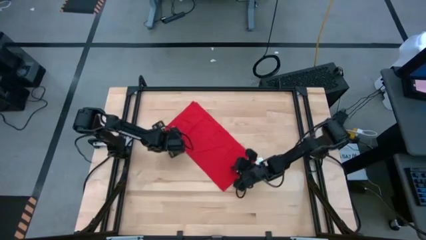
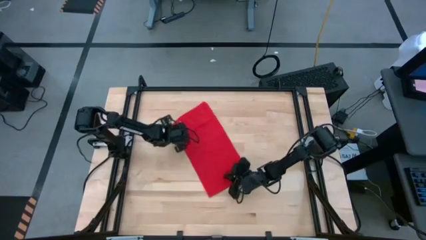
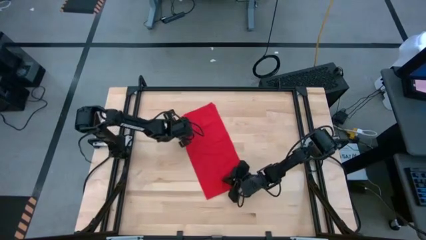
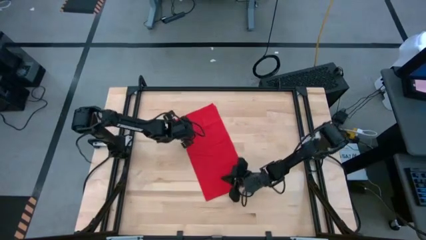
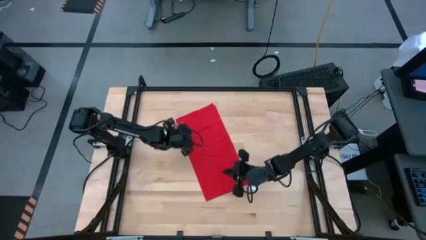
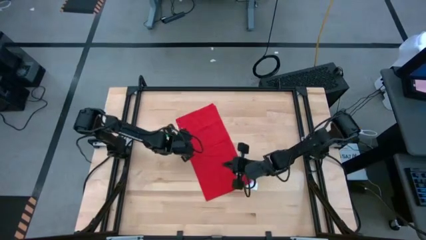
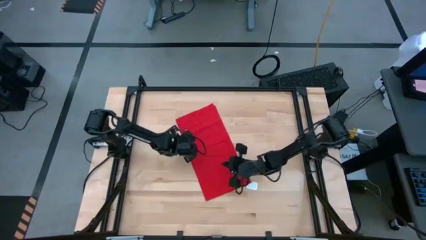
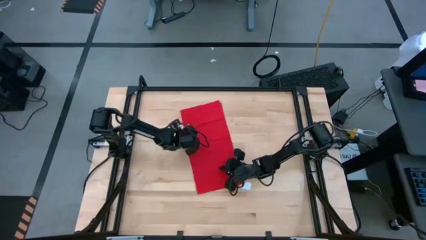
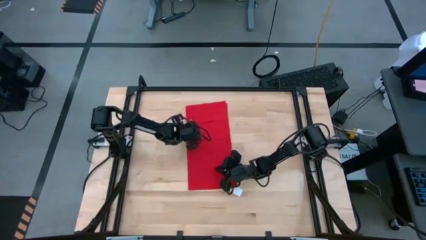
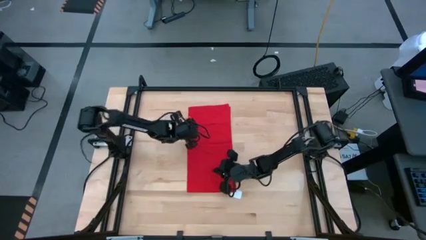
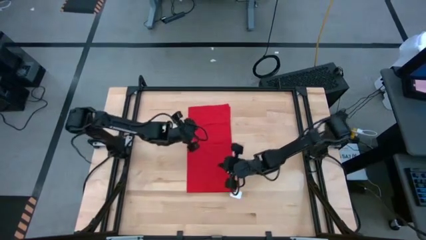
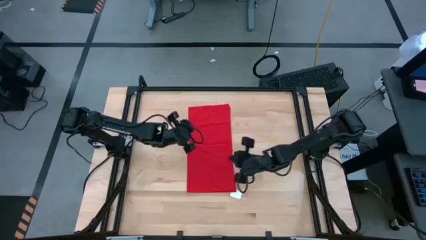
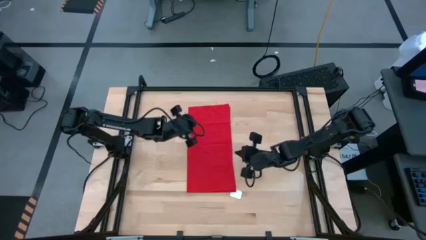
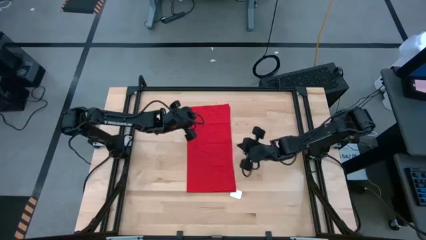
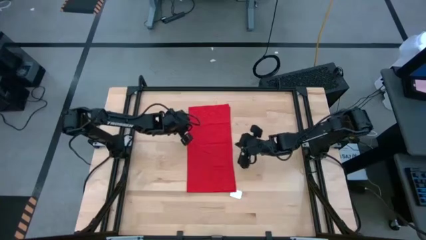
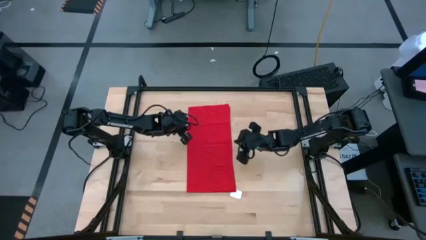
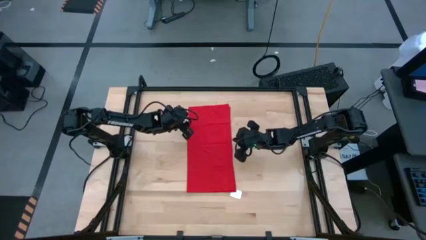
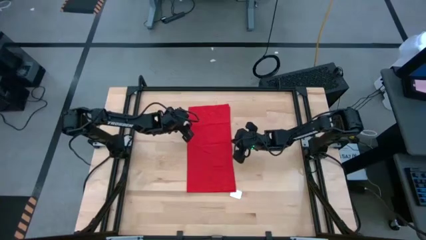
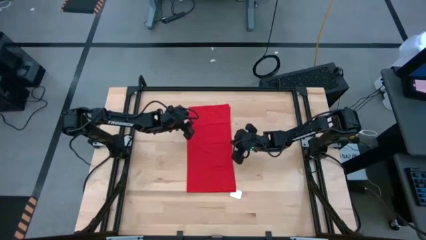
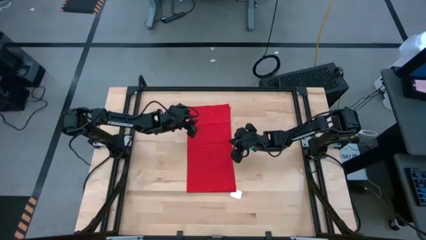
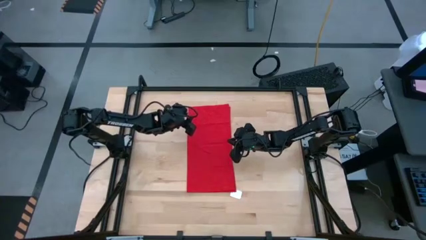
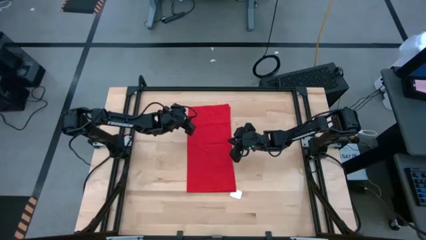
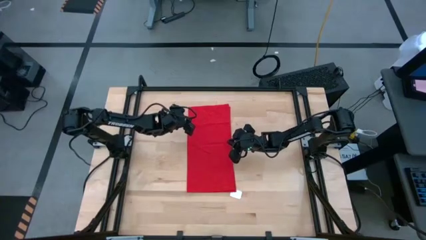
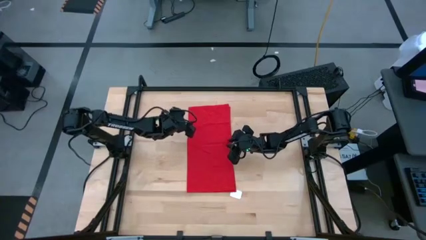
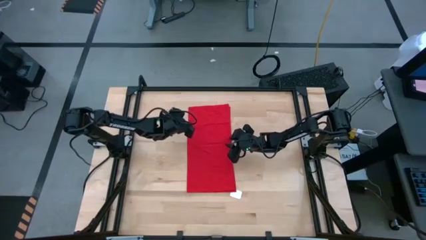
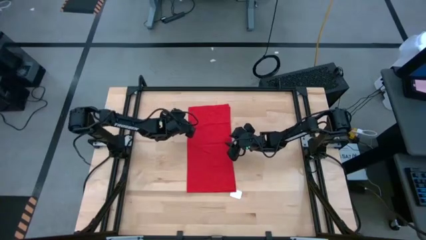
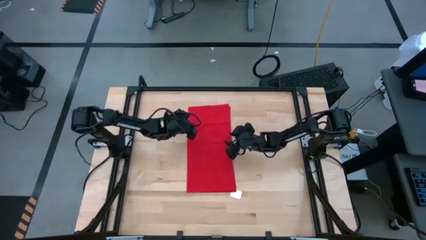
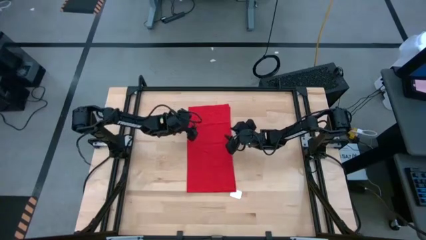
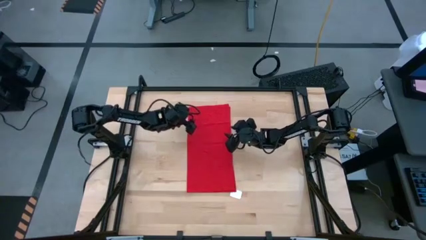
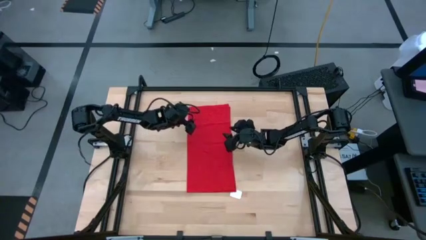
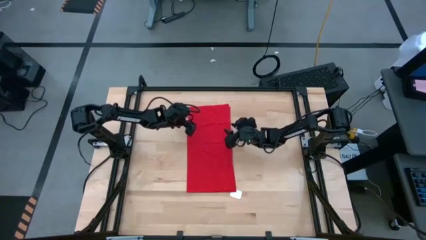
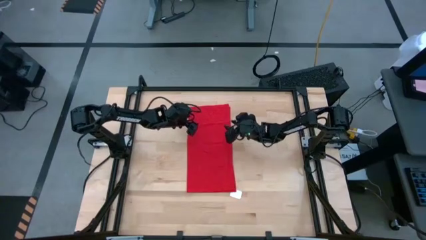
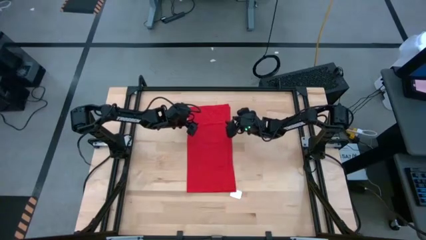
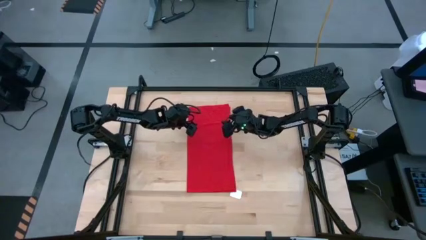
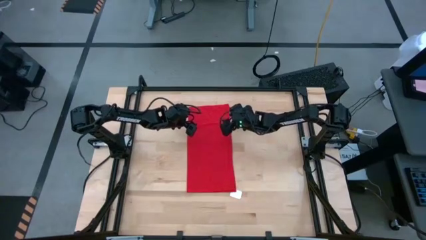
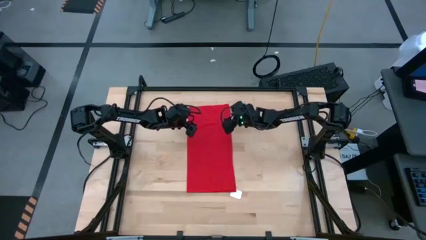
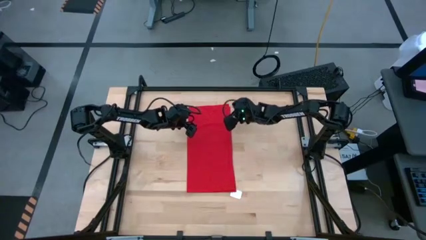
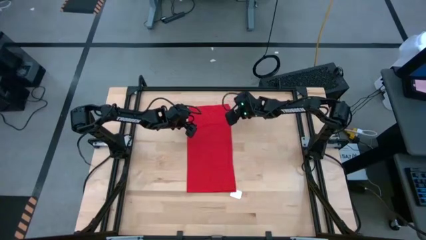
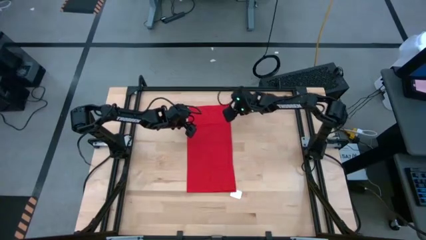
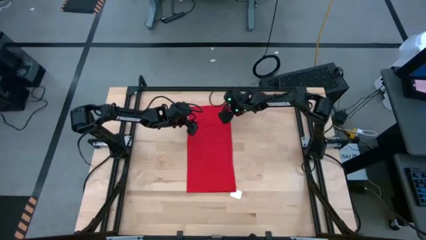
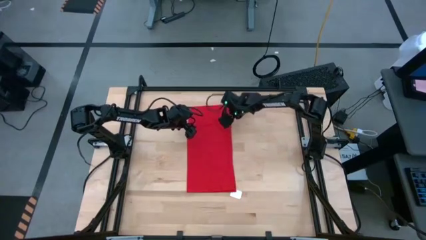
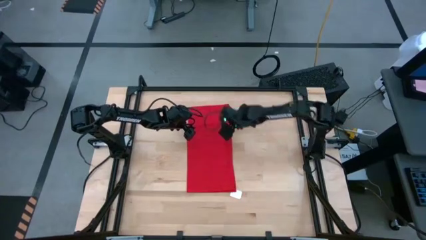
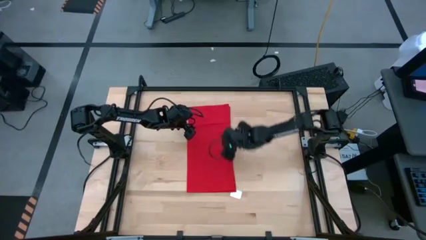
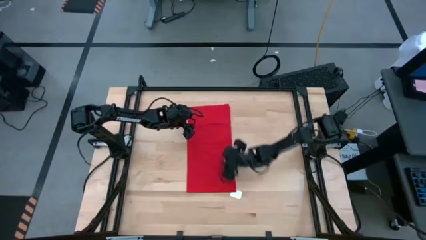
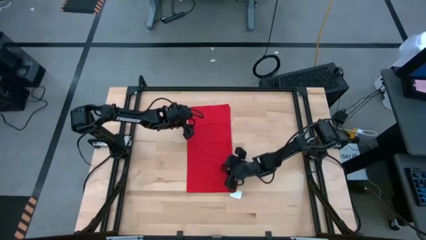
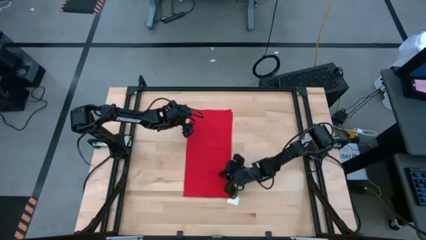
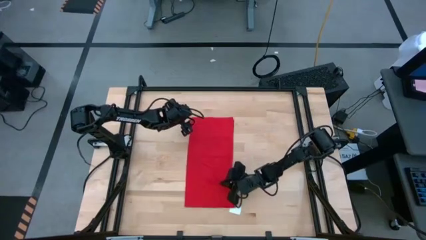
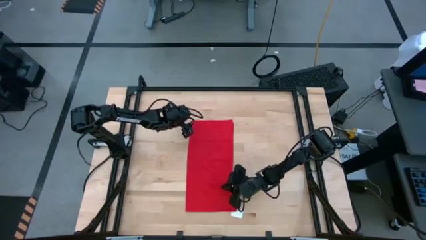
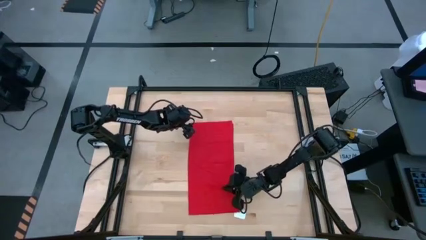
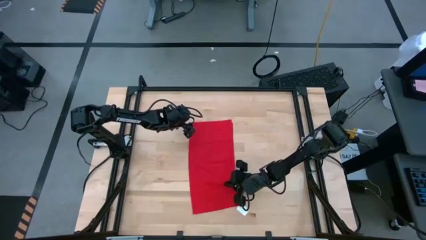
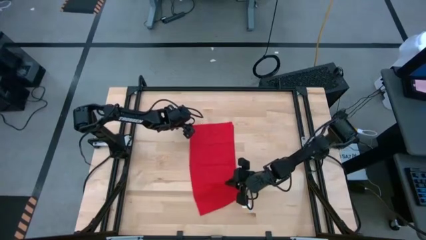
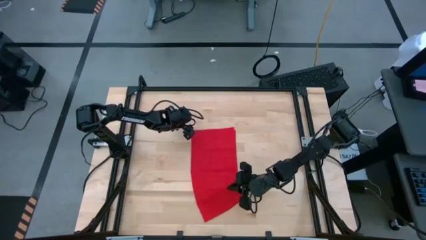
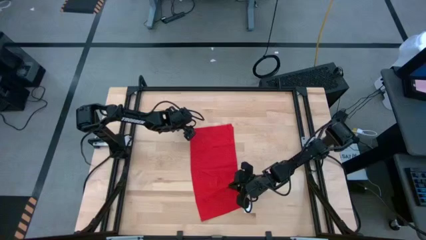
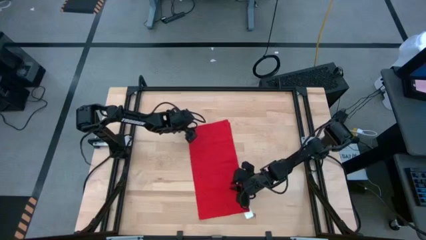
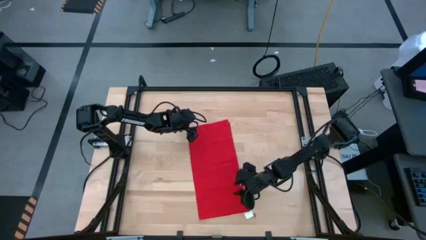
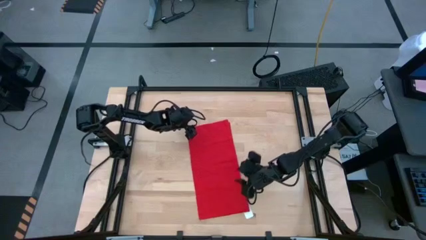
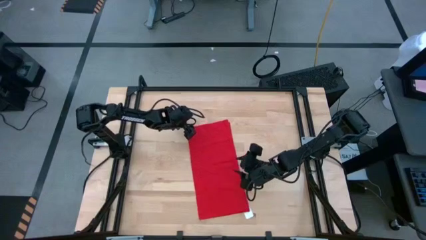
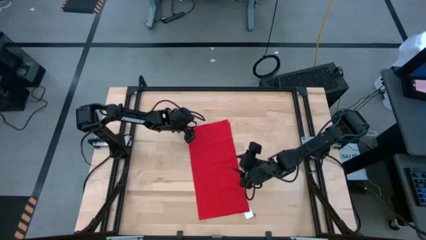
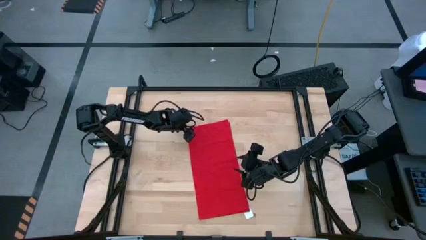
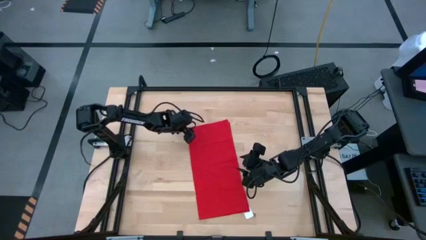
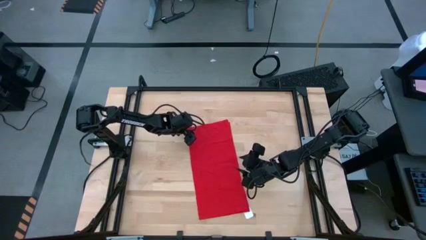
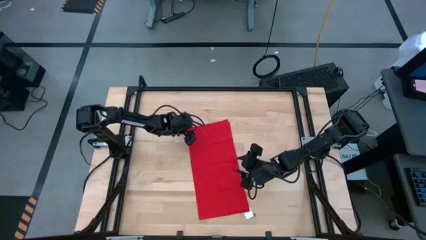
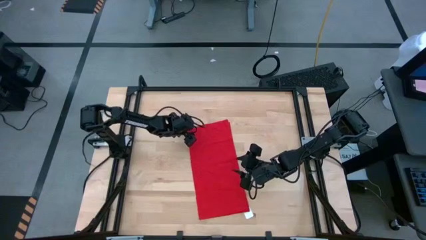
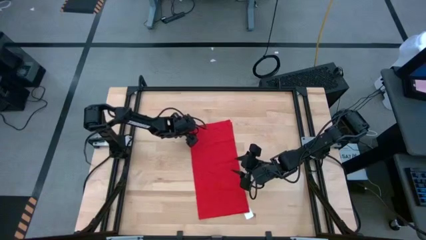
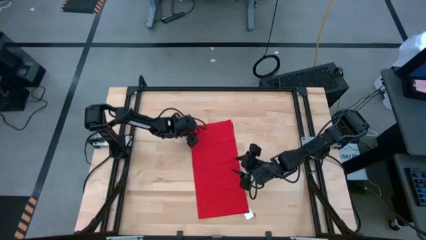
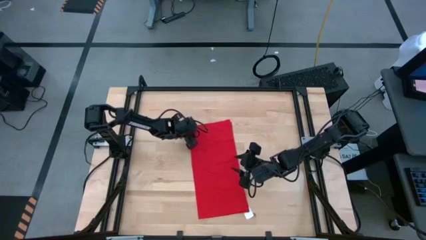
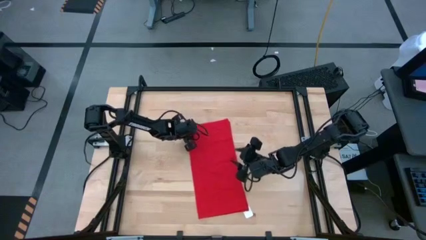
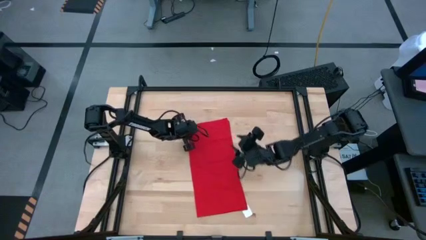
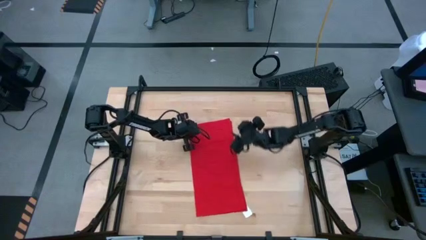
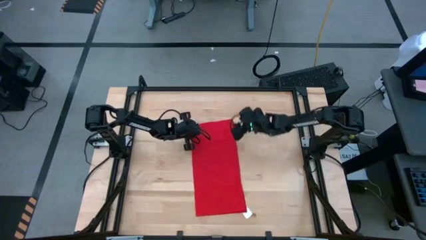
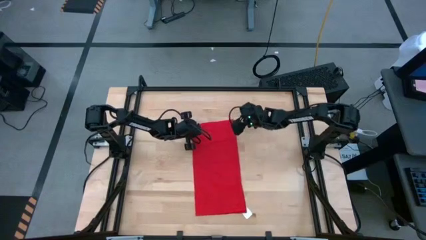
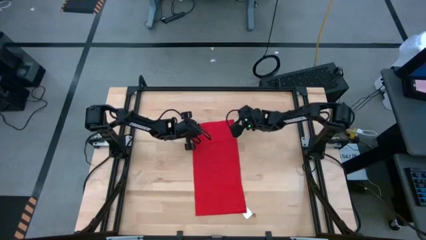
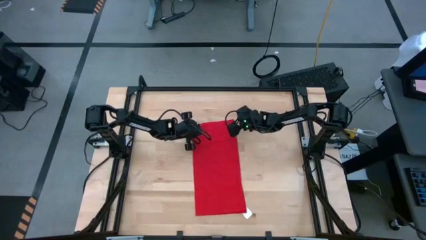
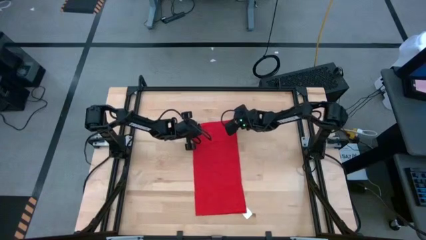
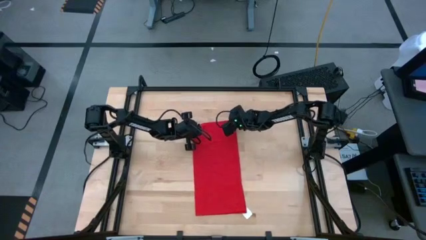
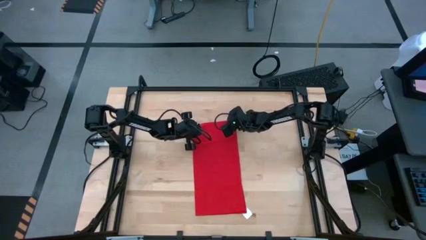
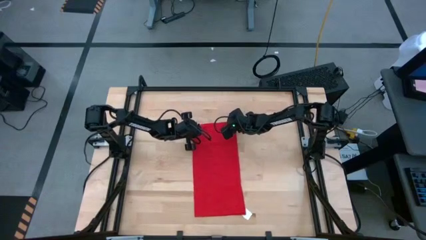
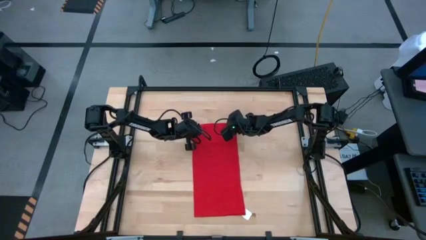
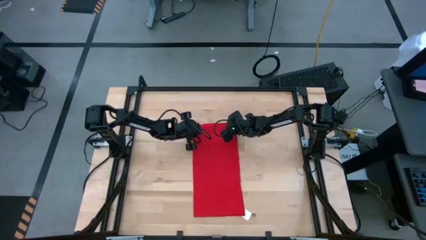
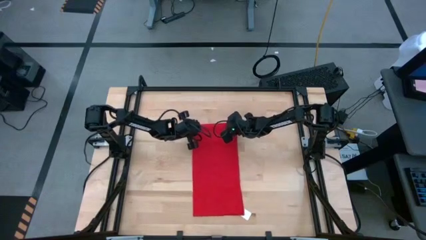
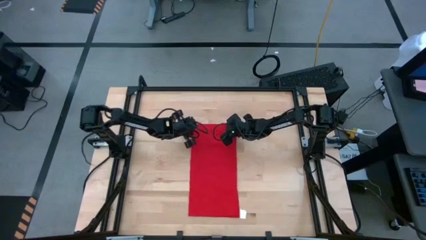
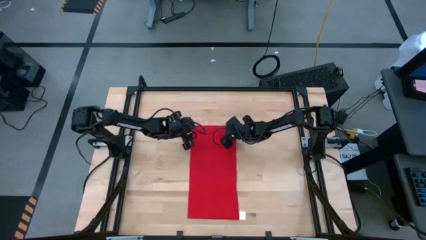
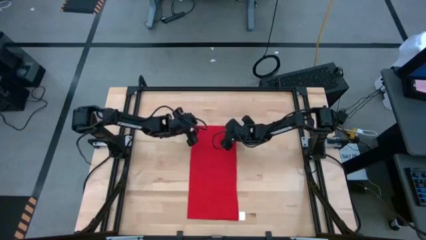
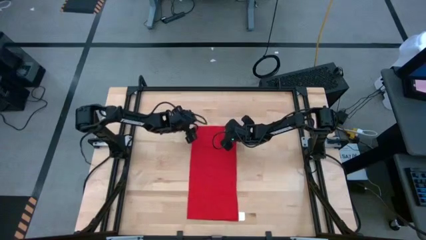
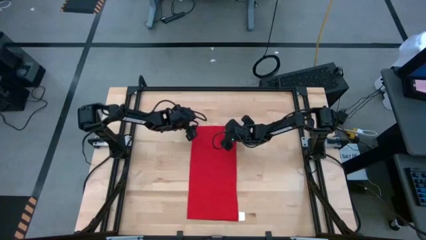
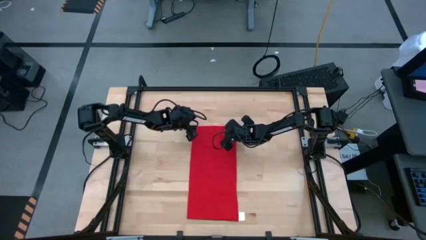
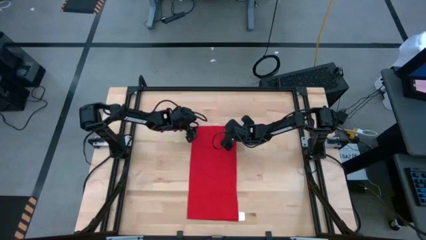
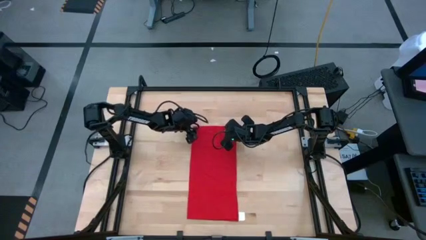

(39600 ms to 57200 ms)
Task: Roll napkin
Fold the red napkin
